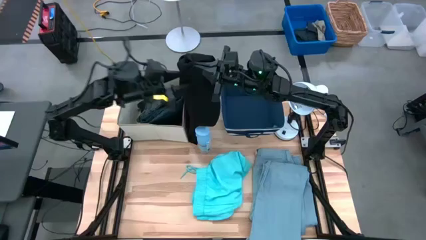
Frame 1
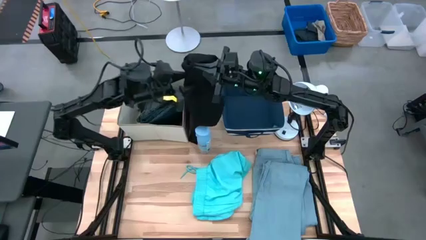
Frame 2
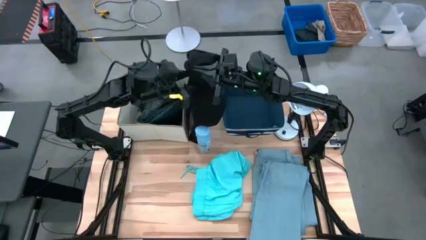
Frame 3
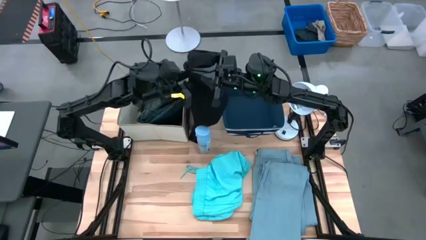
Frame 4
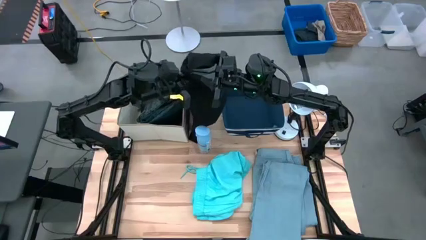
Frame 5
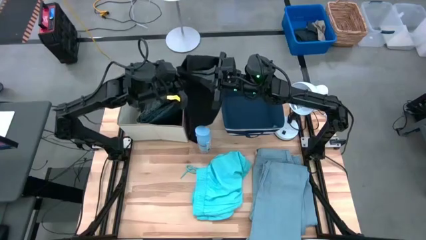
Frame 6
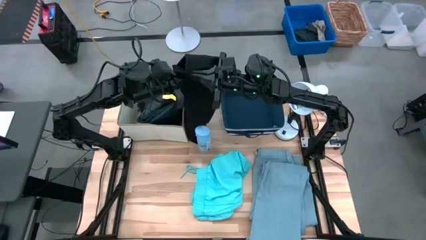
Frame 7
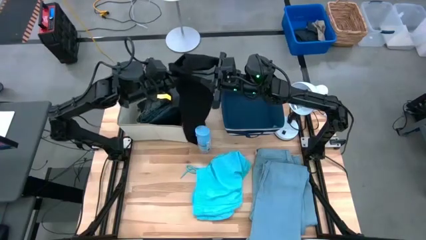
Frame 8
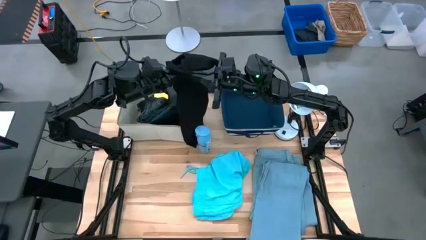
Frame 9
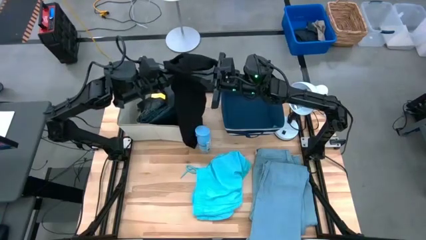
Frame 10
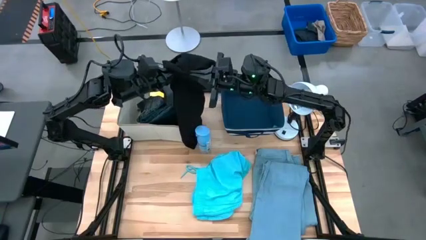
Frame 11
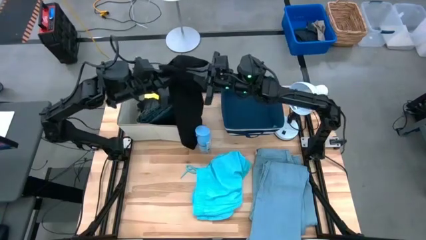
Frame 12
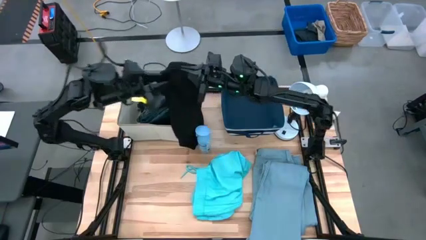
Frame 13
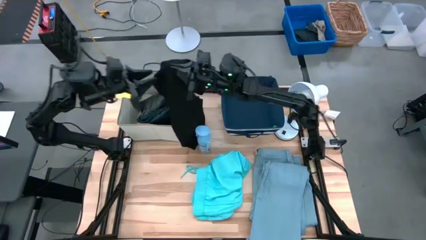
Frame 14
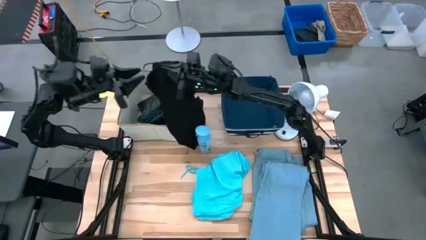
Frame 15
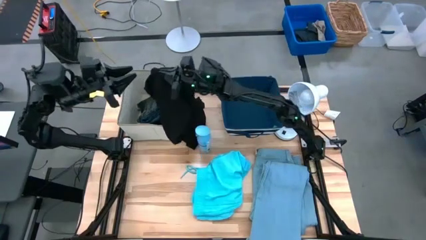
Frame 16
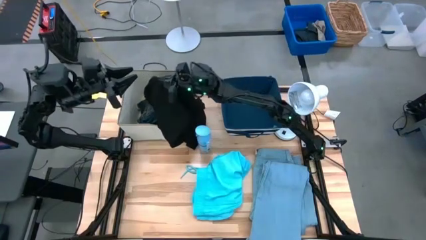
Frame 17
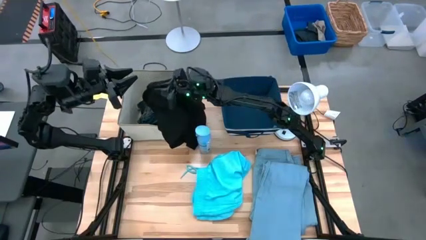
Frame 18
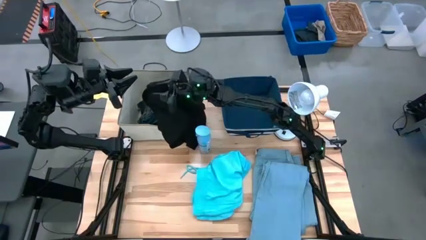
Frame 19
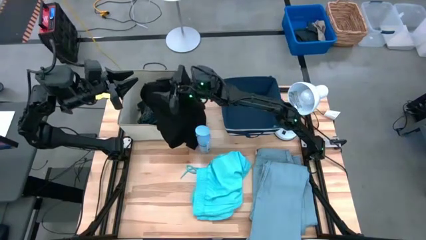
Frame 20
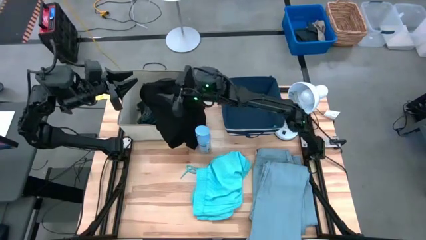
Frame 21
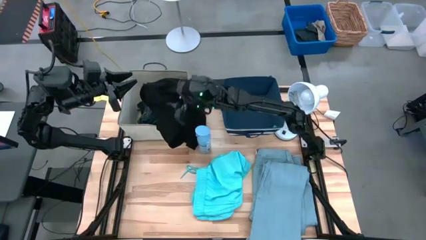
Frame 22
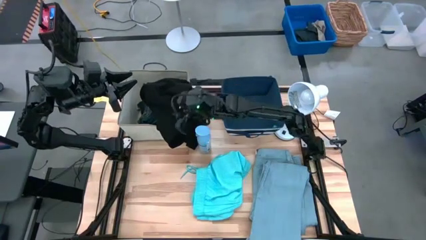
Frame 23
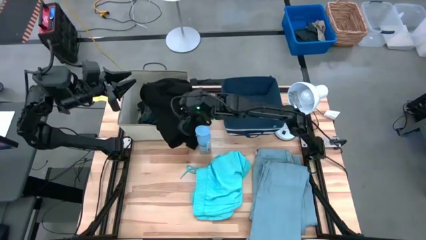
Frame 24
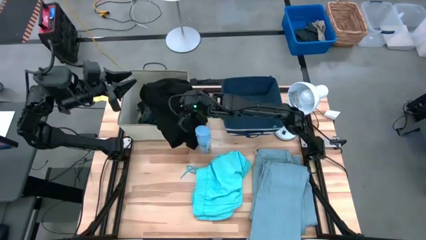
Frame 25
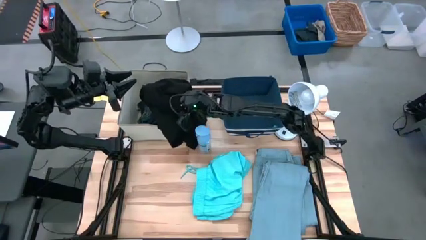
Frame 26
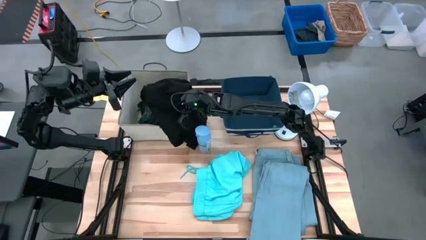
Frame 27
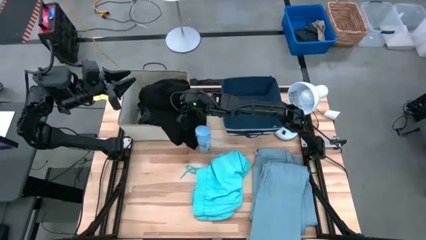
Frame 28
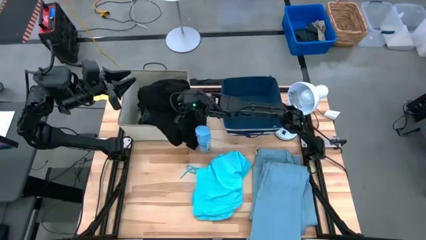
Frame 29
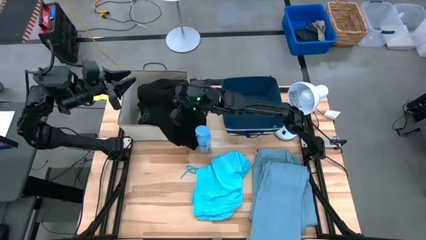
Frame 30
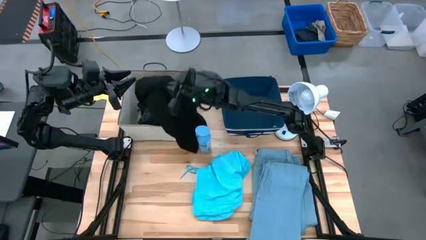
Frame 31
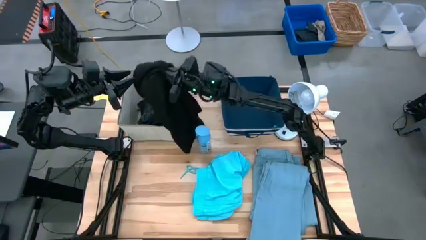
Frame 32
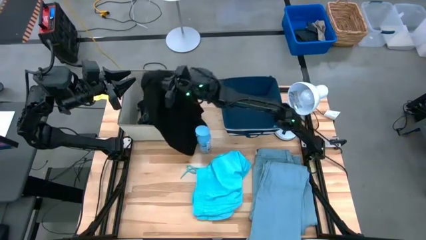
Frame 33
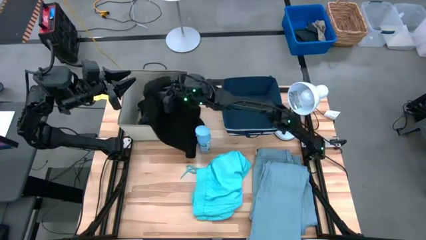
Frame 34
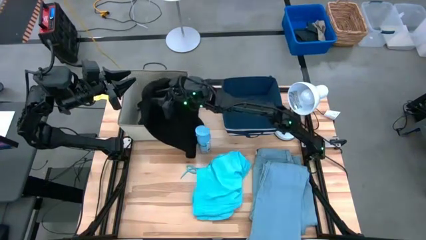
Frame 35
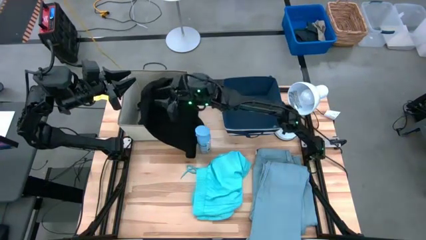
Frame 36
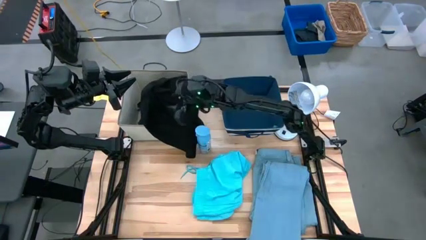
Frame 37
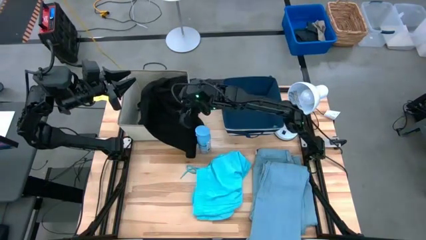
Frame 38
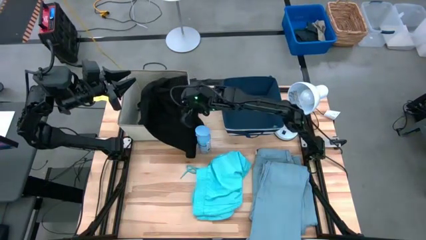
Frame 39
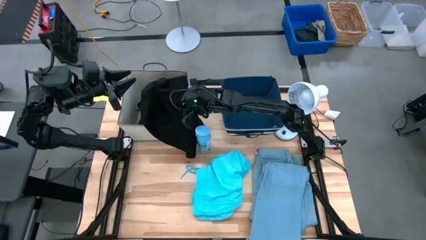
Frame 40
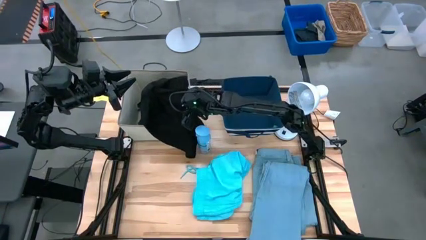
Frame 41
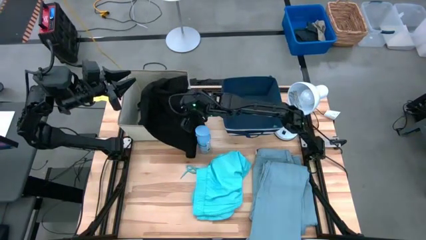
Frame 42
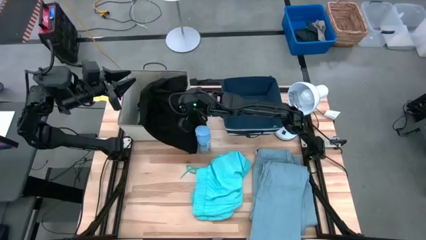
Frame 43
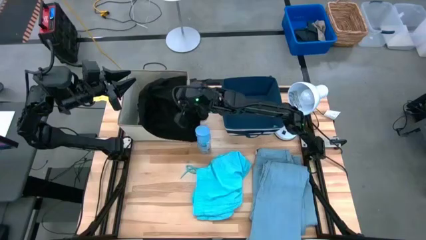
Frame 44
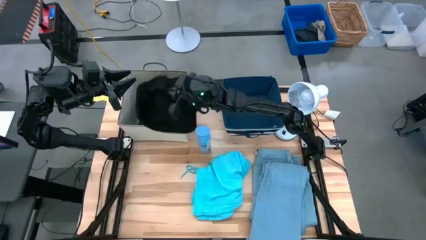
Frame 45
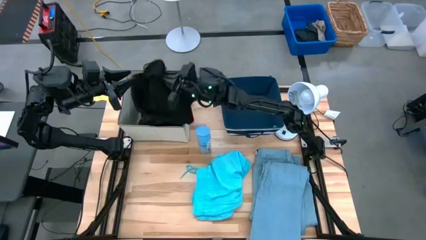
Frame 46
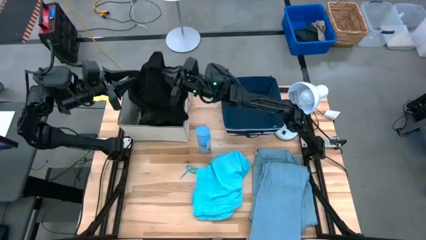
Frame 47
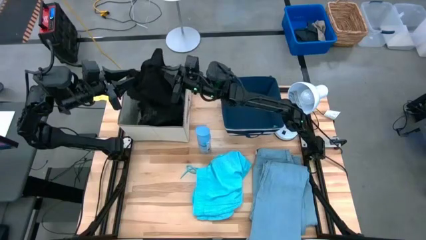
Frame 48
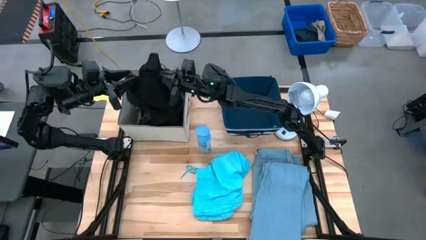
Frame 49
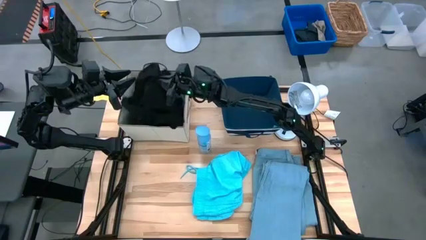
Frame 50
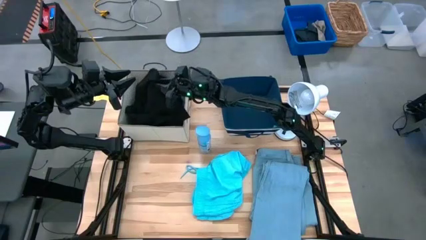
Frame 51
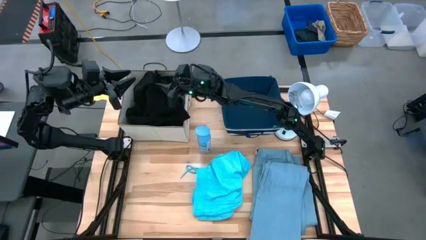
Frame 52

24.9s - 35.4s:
Task: Sort clothes
Put the black shirt into the laundry organizer

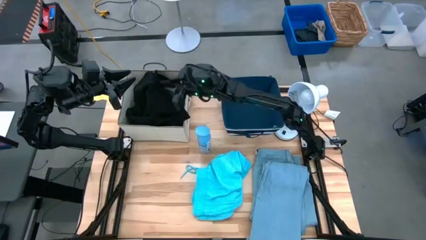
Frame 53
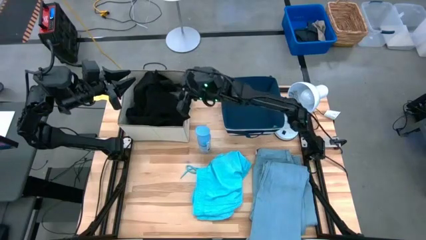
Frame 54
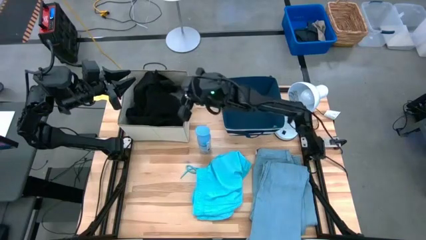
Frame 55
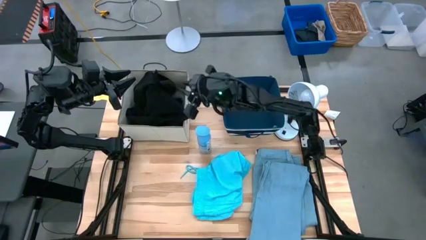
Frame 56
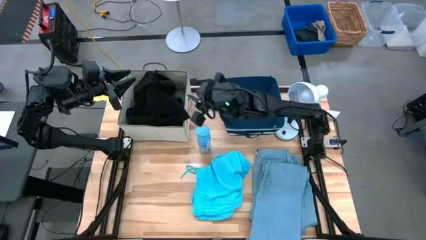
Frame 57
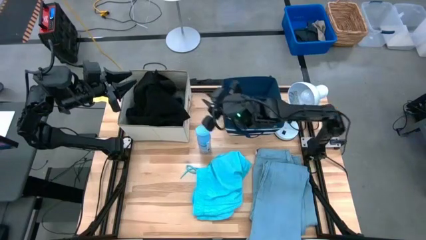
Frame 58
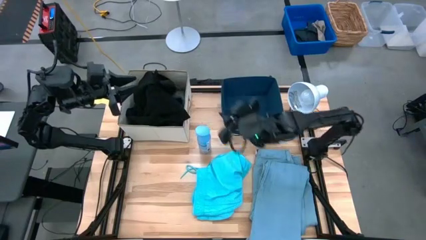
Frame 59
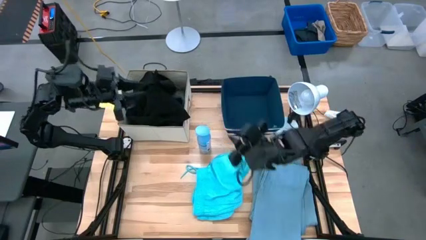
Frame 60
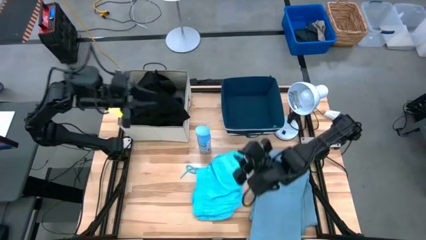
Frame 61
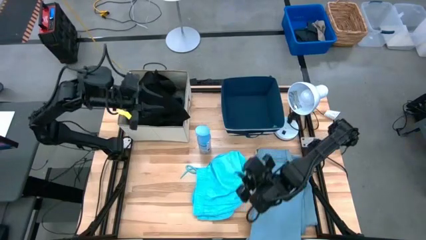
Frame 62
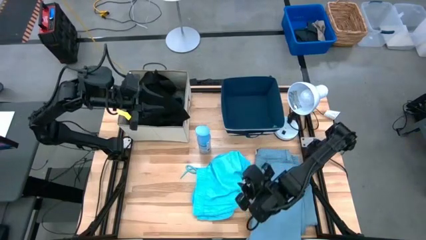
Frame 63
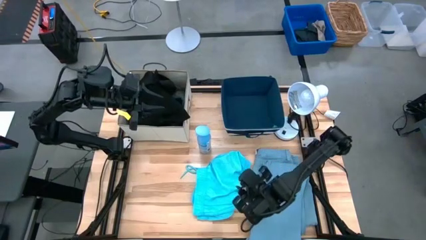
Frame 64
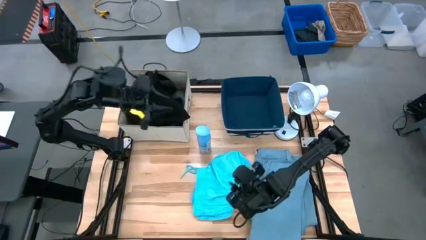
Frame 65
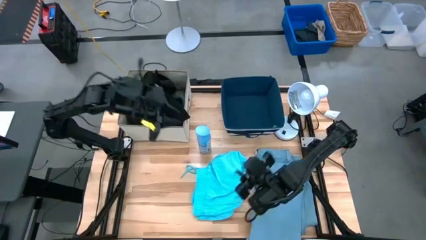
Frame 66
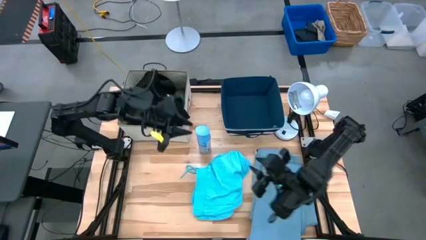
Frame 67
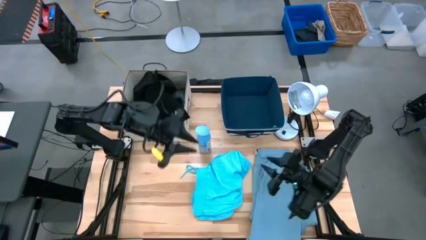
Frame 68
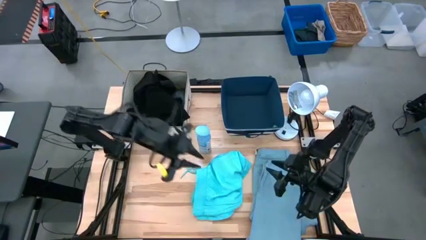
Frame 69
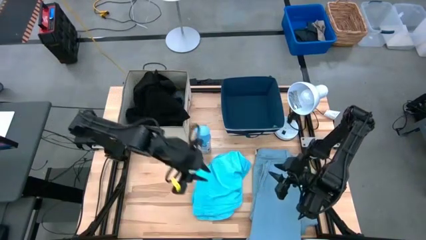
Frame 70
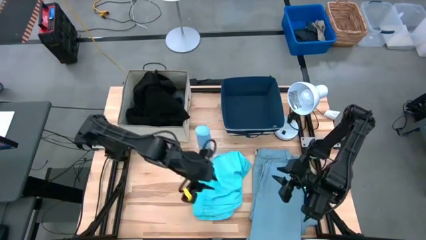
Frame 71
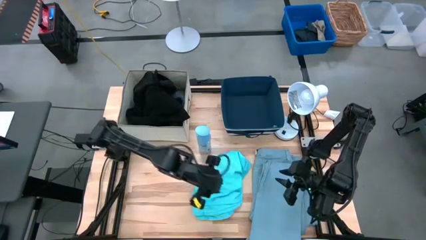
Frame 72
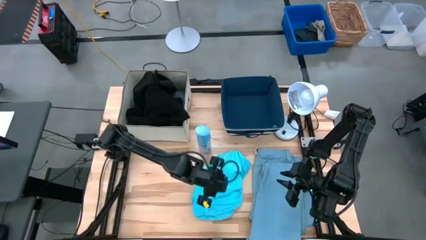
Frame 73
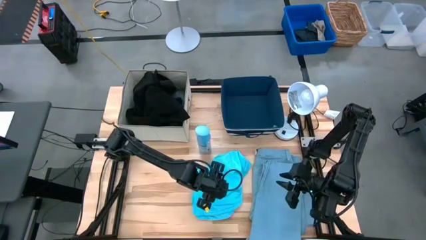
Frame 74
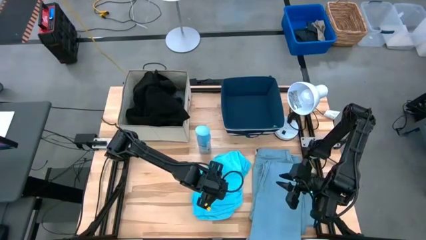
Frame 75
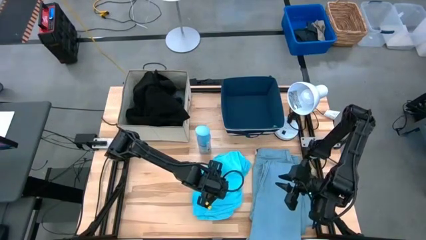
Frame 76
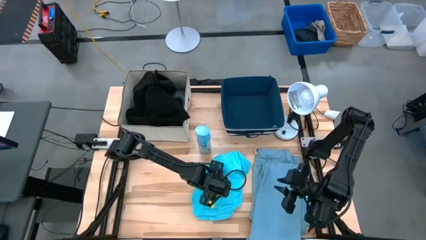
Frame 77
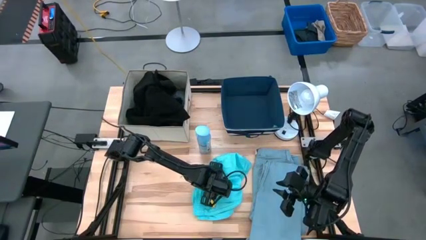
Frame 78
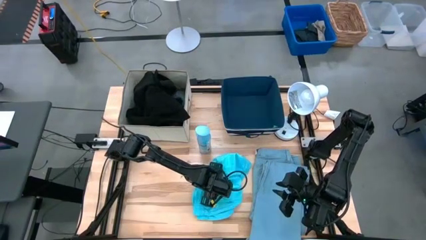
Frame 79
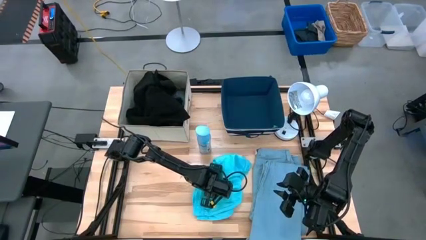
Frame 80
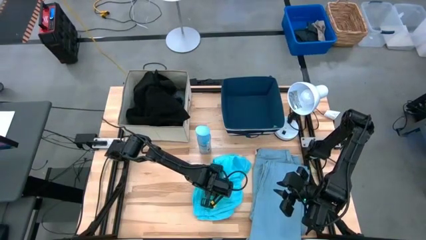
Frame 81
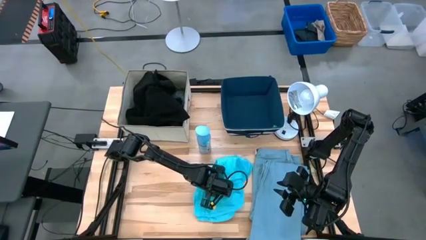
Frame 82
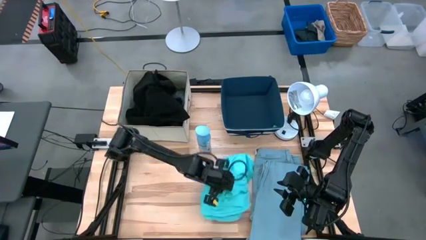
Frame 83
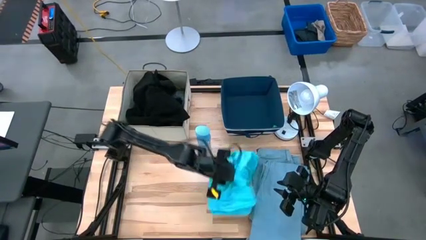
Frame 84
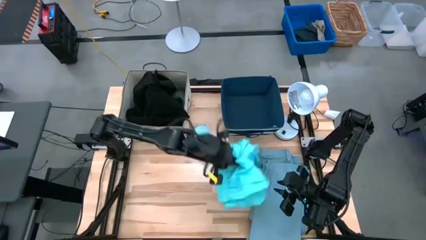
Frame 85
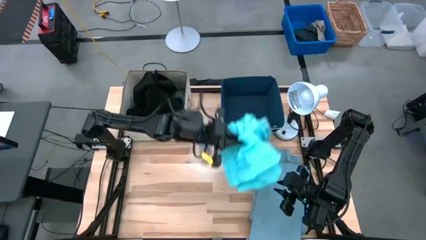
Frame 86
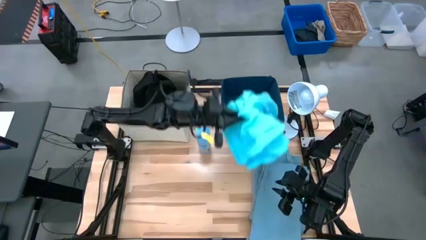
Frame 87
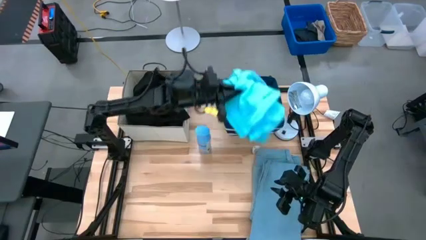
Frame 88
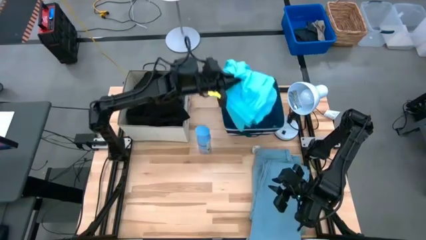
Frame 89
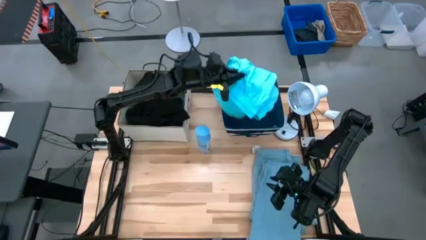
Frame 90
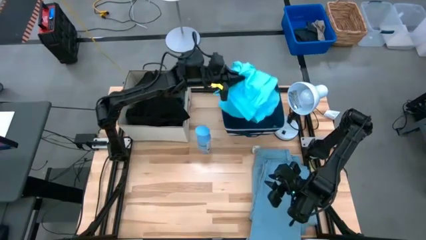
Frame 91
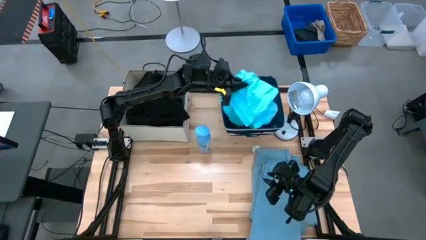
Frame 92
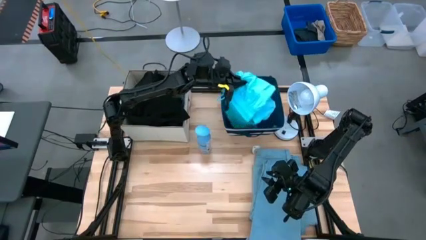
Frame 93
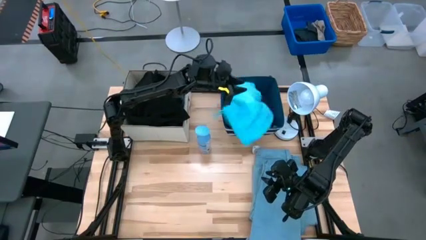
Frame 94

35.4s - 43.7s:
Put the blue shorts into the blue laundry bin
